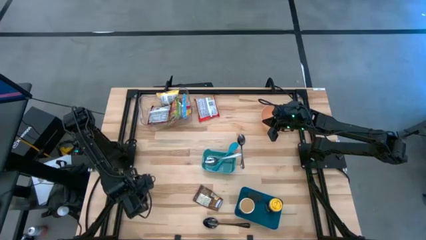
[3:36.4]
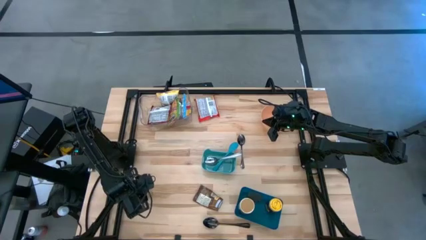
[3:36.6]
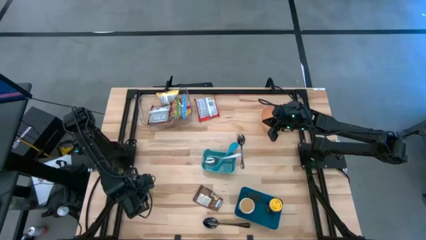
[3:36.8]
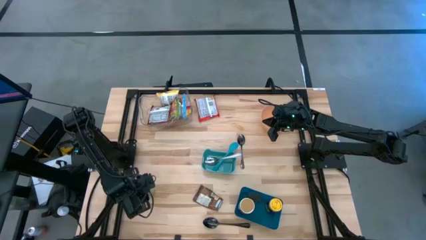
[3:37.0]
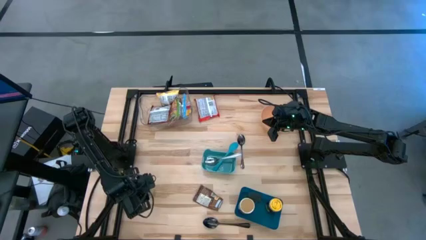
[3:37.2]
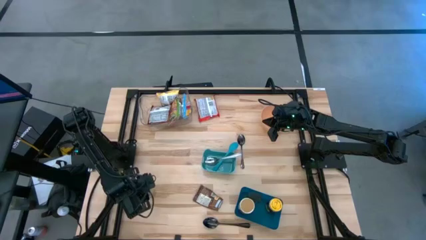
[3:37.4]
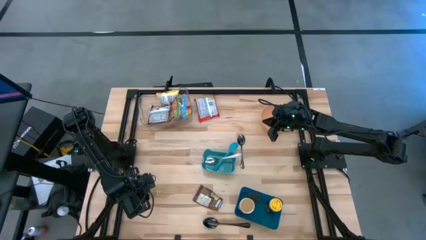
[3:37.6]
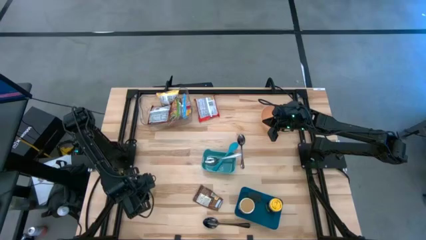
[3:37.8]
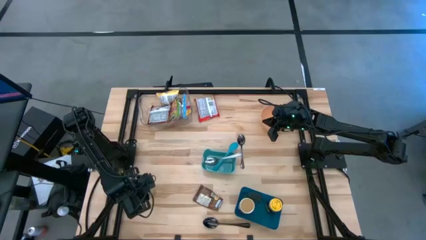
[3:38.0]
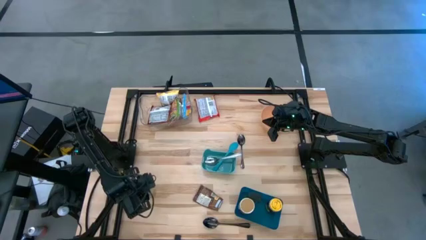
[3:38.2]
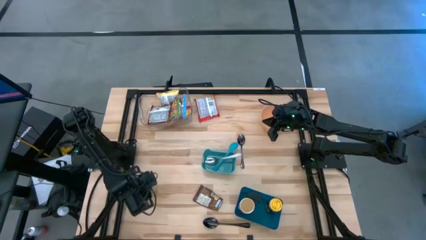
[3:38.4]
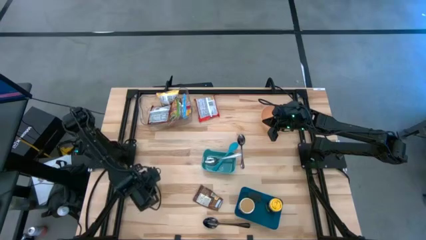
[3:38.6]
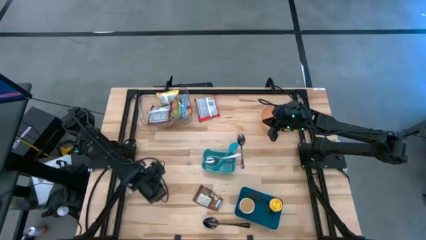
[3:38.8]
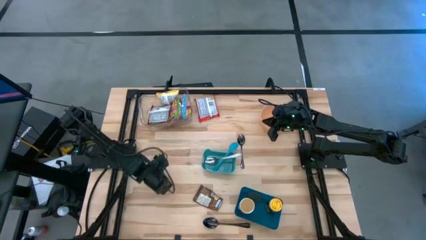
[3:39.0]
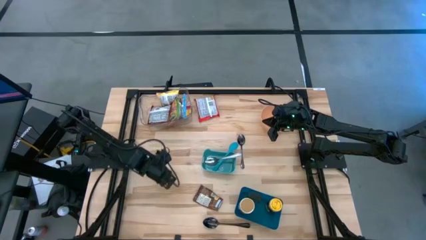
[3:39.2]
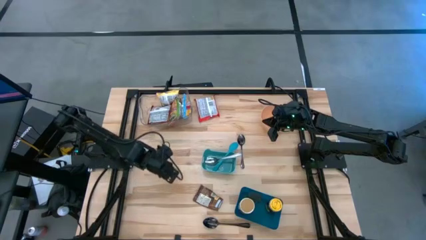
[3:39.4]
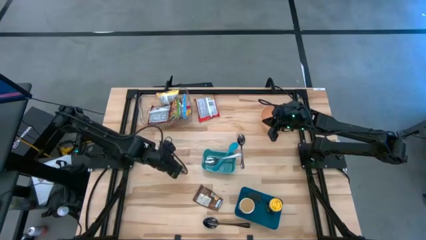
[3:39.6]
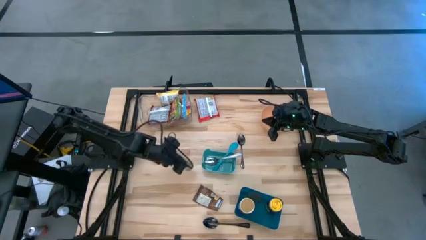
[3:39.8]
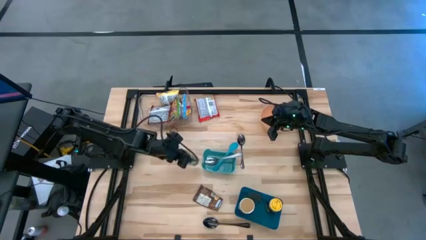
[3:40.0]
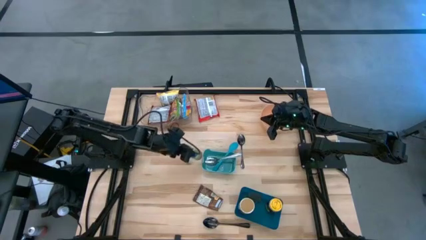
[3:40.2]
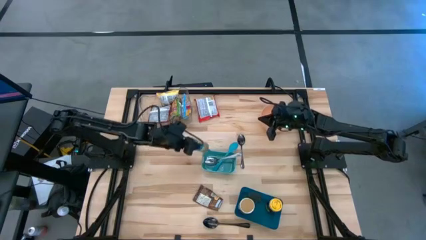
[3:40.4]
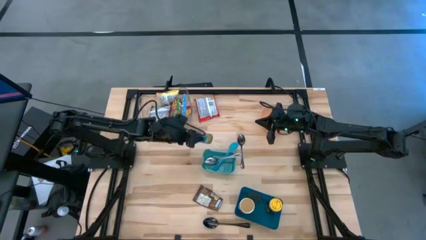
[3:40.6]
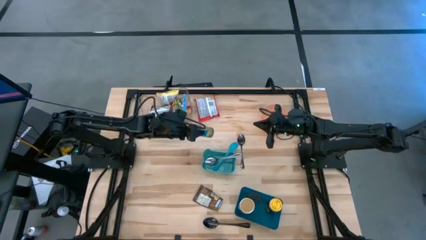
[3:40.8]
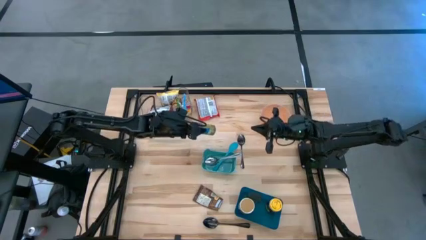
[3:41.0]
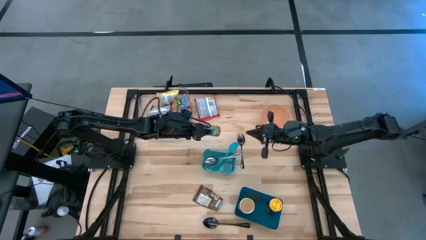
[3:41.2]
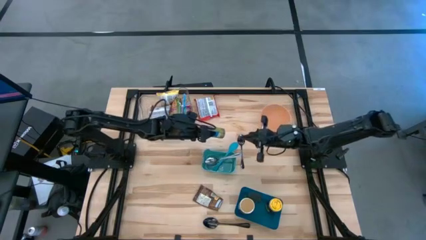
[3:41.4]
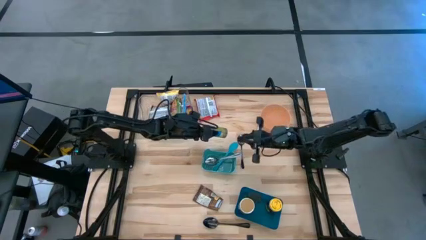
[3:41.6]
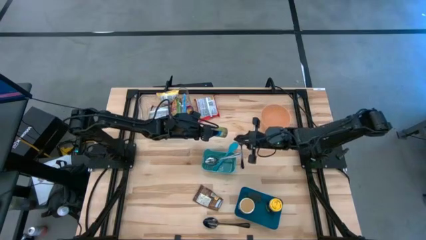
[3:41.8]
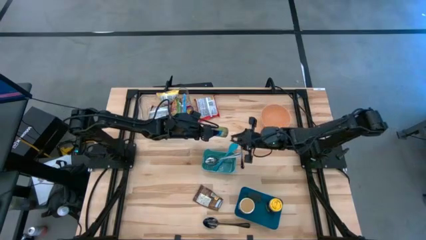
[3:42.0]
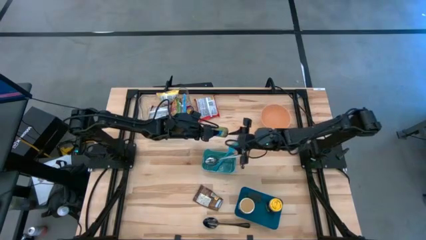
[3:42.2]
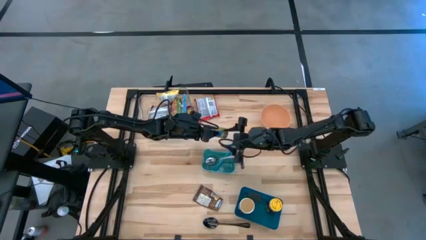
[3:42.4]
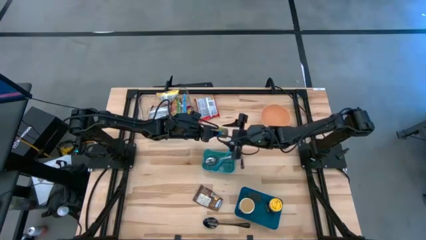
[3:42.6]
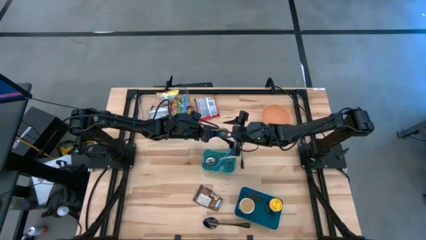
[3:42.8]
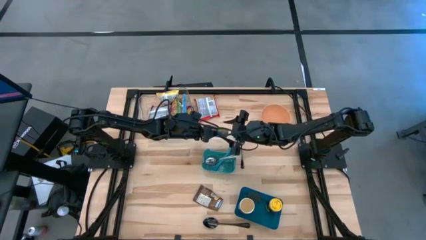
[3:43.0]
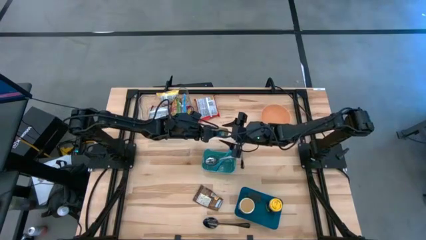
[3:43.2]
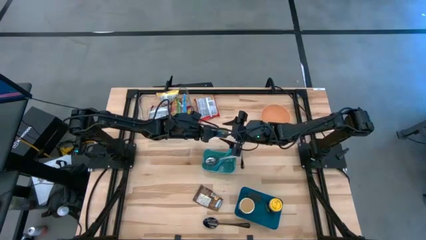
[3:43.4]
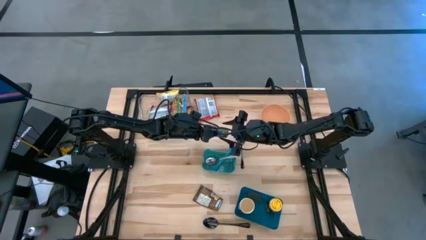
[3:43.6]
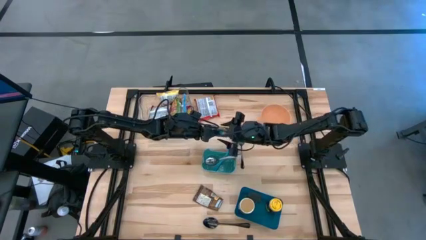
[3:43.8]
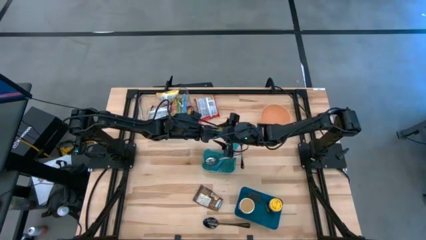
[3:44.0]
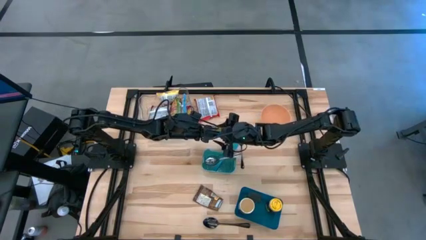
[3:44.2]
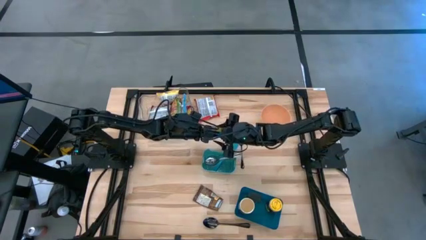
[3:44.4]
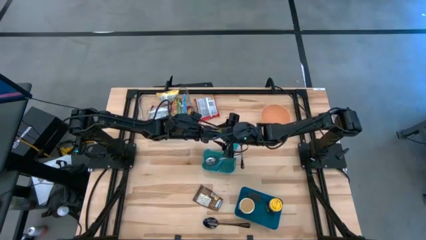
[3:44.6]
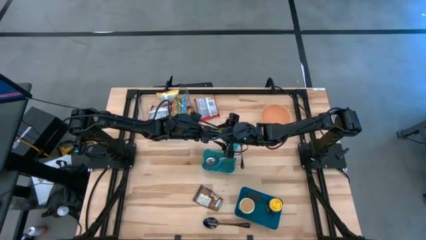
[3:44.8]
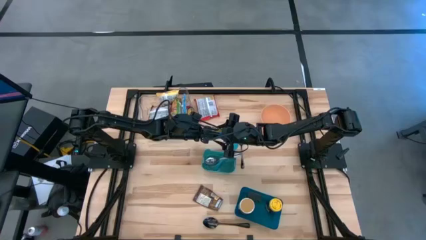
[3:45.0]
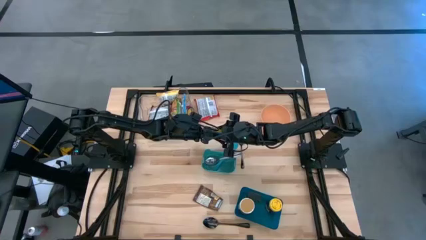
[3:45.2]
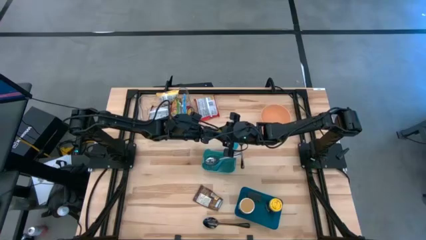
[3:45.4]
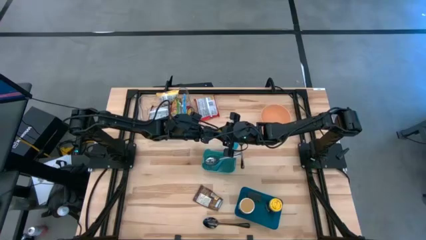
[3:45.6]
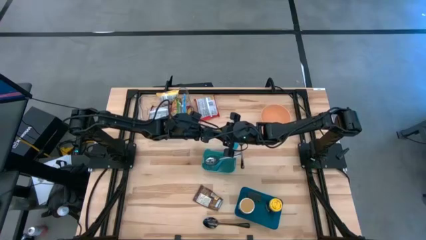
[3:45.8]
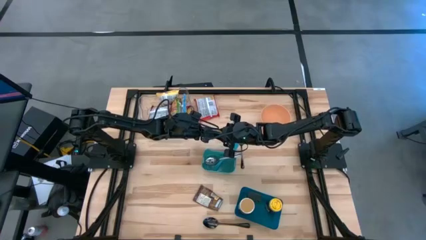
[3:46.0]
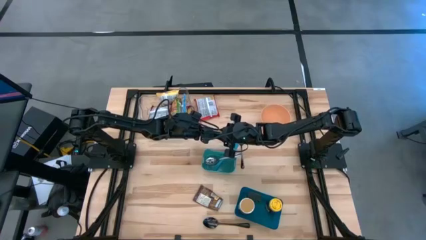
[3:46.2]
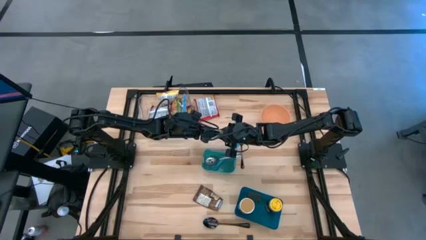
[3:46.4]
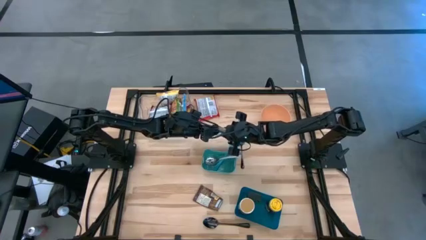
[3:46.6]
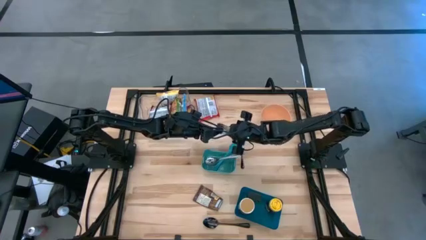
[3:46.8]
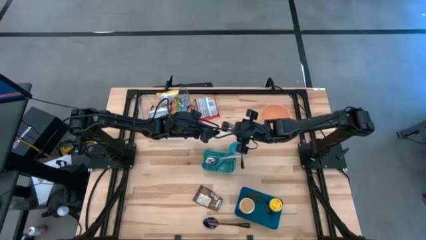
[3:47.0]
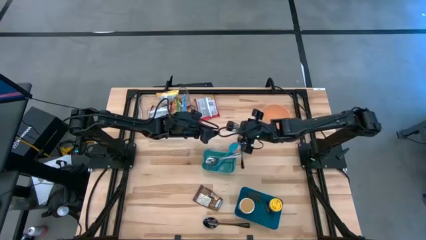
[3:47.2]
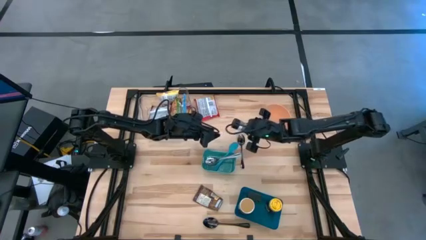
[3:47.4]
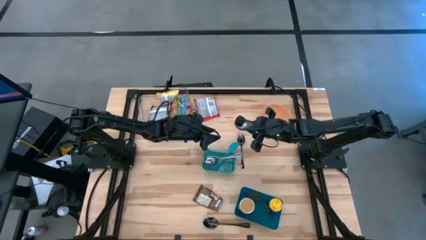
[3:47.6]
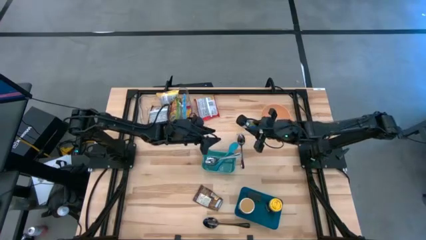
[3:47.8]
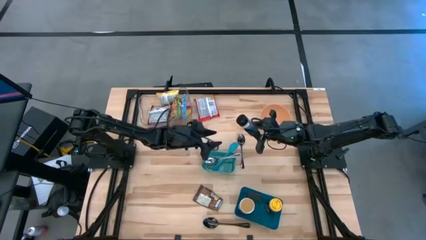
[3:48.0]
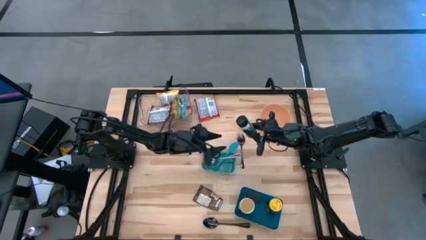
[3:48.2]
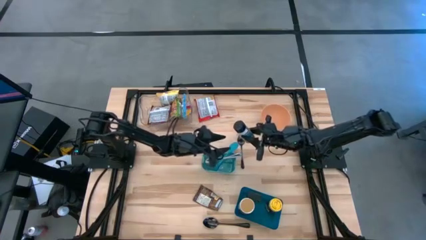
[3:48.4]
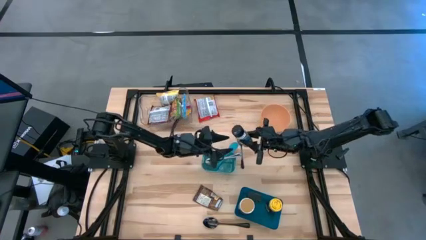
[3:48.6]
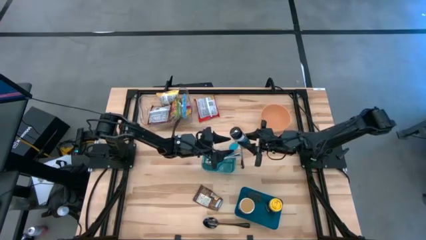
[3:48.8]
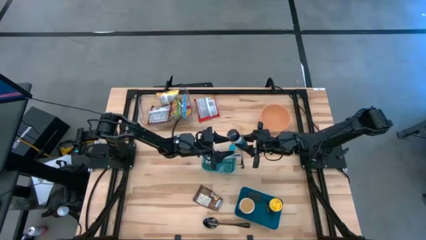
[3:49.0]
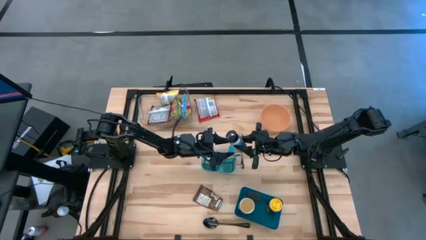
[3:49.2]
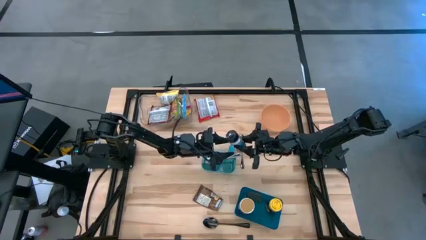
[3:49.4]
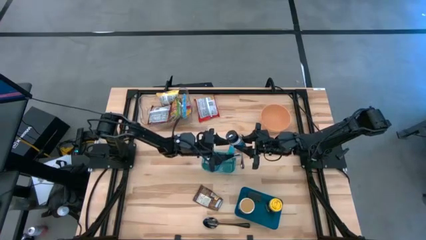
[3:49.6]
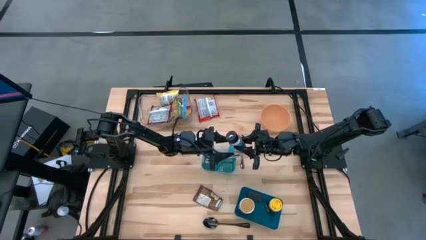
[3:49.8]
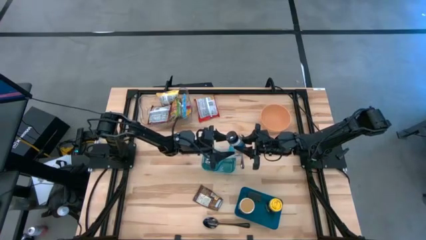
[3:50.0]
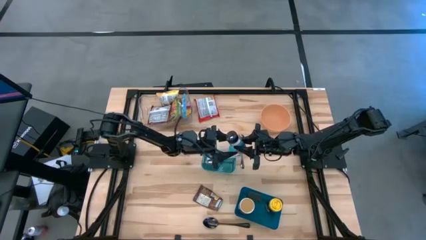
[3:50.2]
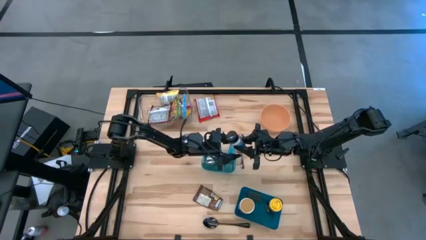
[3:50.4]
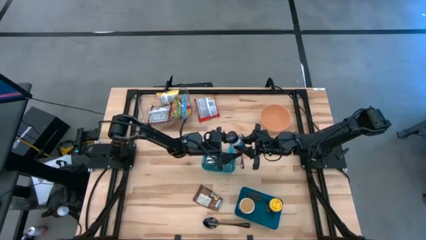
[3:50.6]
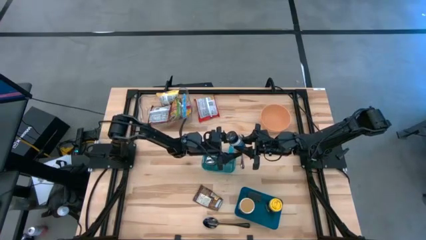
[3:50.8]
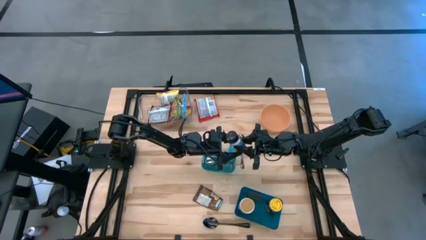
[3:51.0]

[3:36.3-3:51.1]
Task: Pick & Place Food Item
Put the green seasoning bottle into the blue bin
